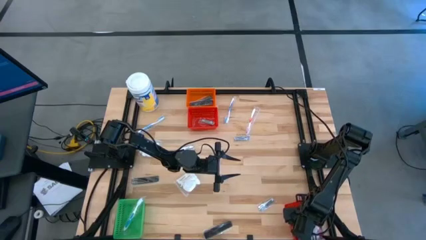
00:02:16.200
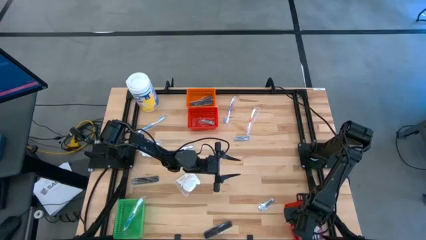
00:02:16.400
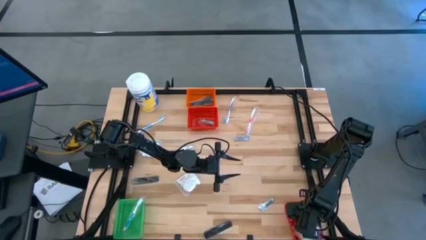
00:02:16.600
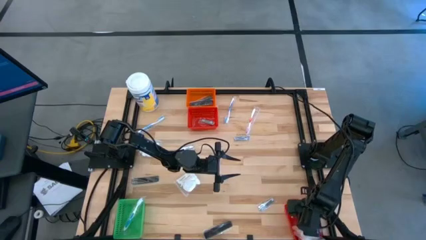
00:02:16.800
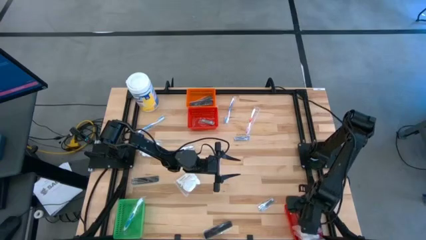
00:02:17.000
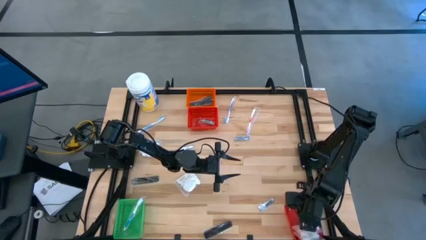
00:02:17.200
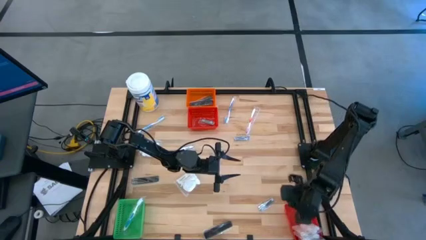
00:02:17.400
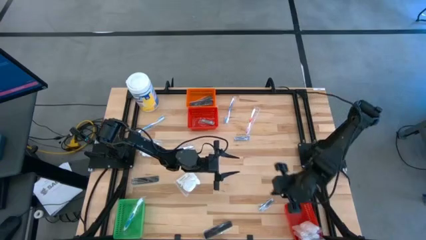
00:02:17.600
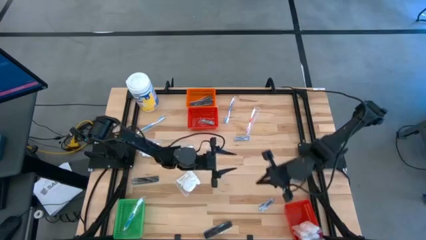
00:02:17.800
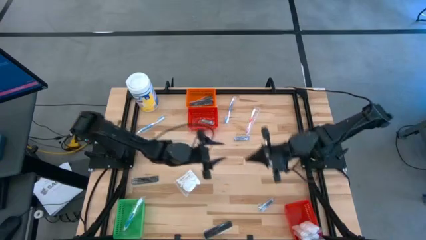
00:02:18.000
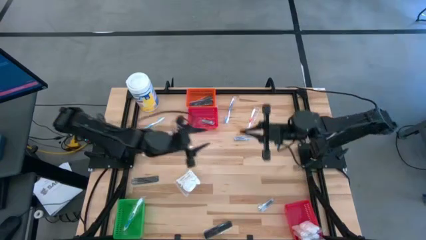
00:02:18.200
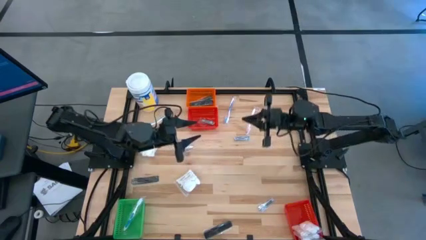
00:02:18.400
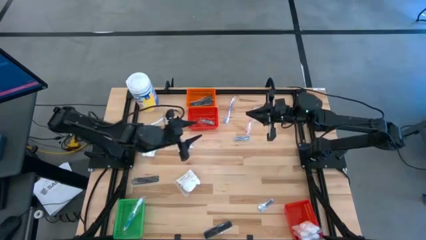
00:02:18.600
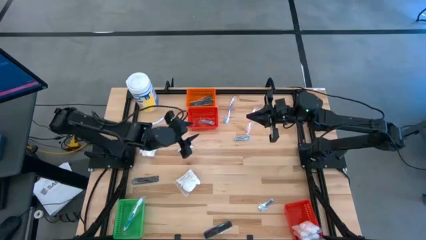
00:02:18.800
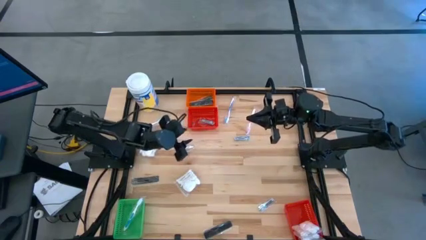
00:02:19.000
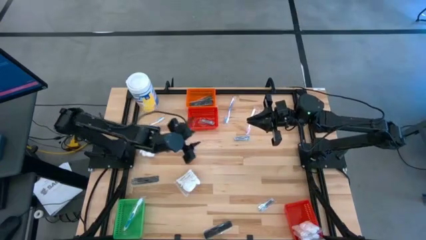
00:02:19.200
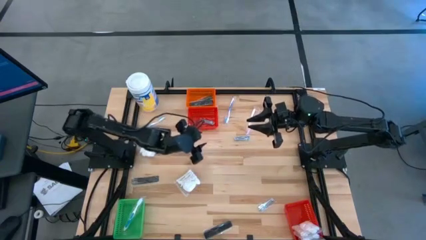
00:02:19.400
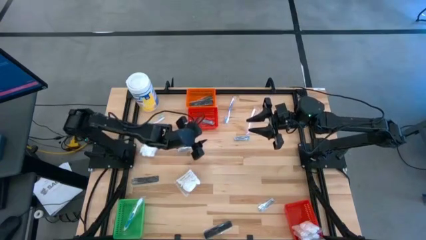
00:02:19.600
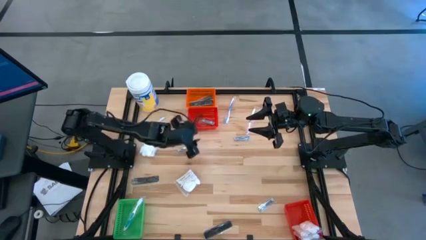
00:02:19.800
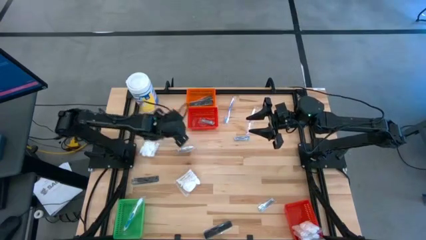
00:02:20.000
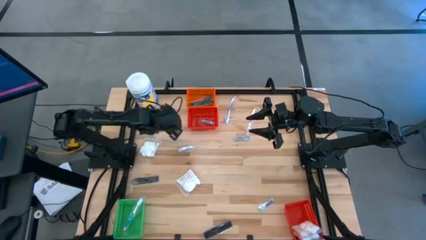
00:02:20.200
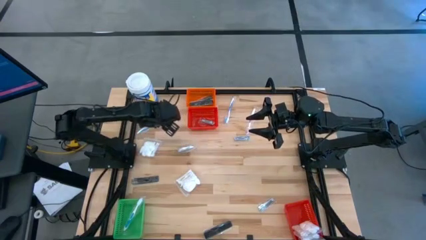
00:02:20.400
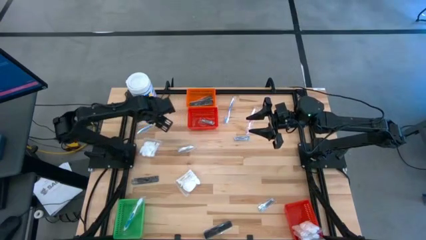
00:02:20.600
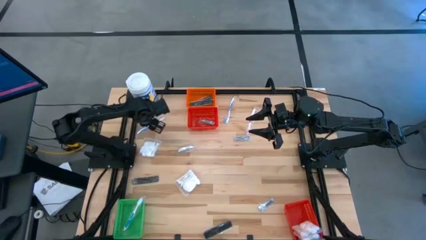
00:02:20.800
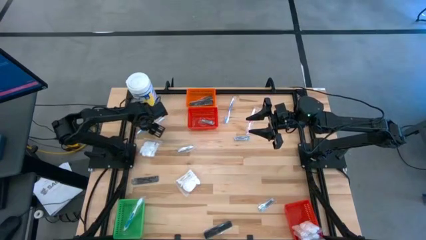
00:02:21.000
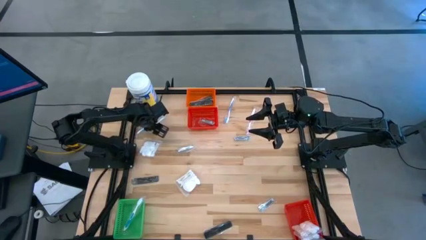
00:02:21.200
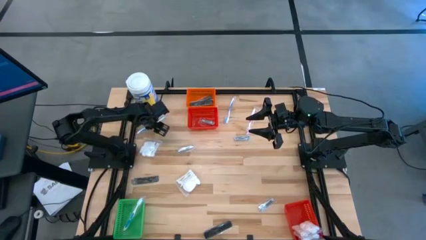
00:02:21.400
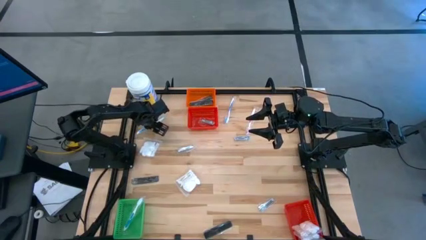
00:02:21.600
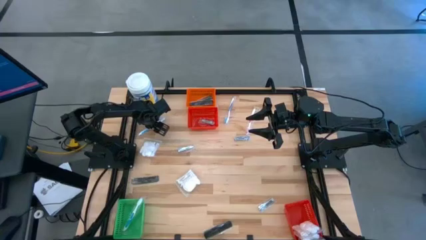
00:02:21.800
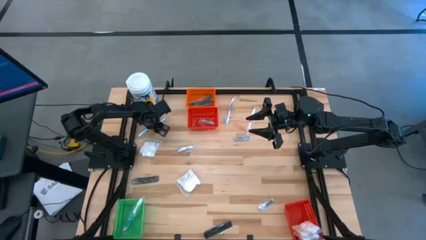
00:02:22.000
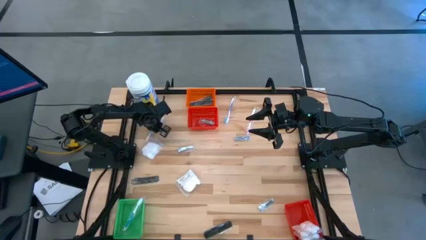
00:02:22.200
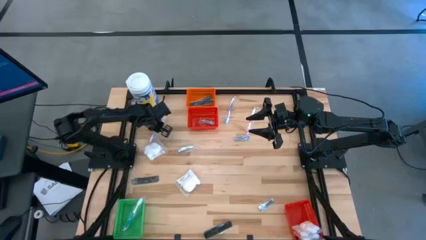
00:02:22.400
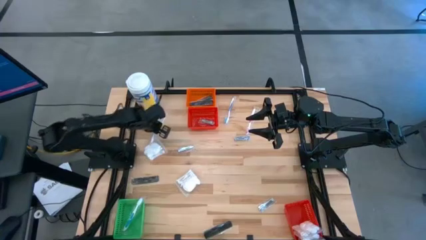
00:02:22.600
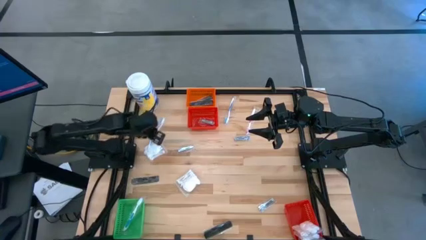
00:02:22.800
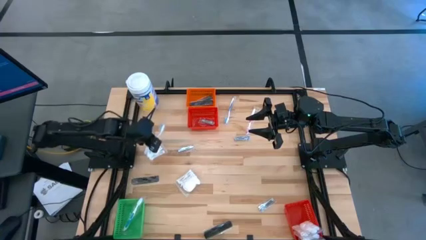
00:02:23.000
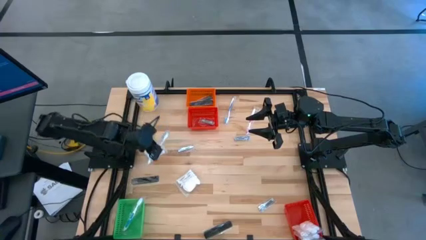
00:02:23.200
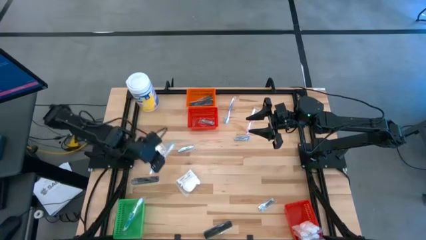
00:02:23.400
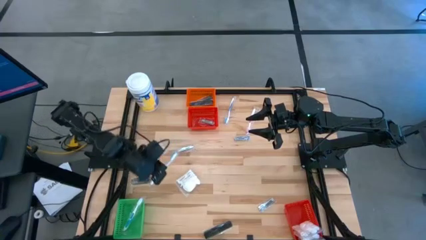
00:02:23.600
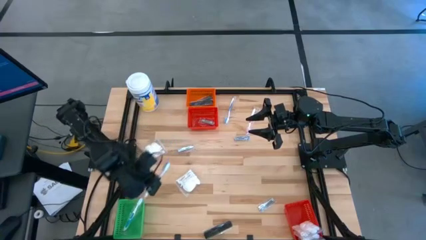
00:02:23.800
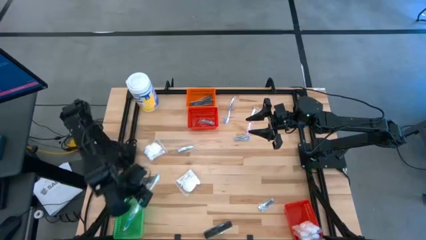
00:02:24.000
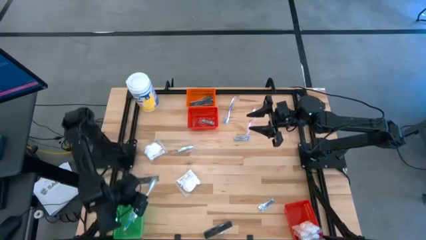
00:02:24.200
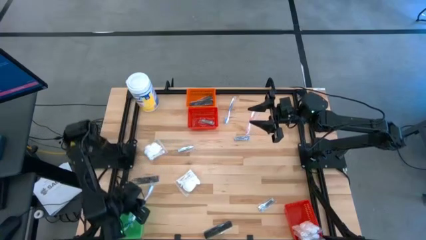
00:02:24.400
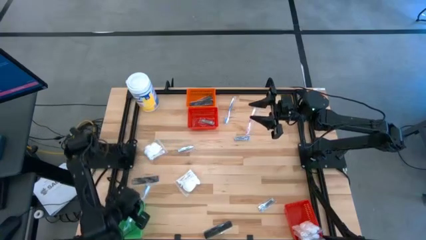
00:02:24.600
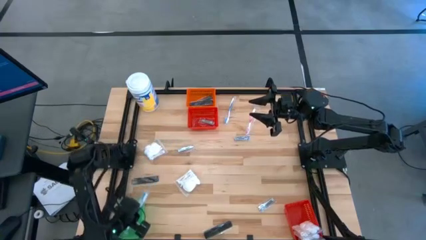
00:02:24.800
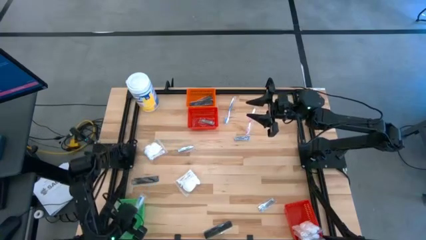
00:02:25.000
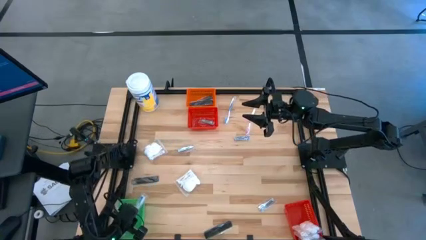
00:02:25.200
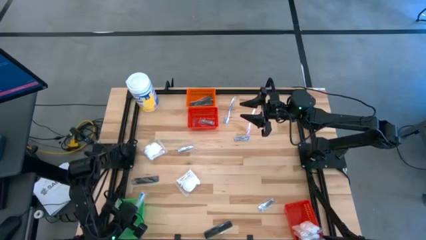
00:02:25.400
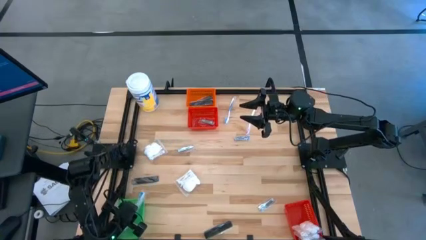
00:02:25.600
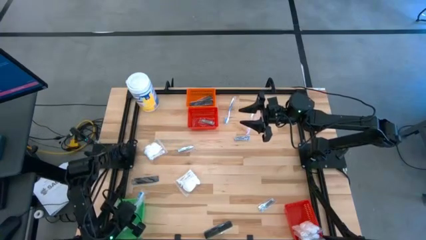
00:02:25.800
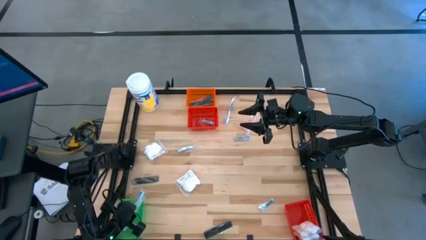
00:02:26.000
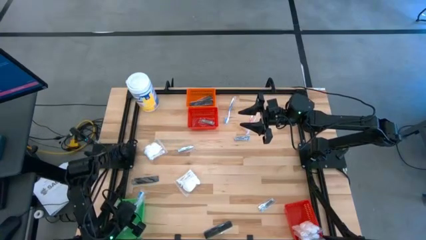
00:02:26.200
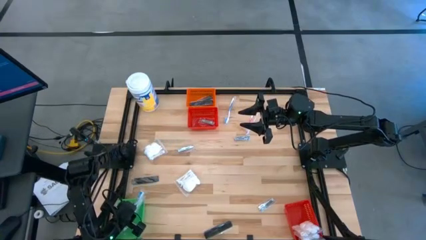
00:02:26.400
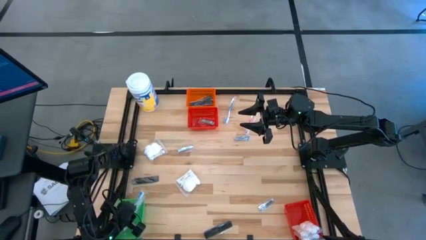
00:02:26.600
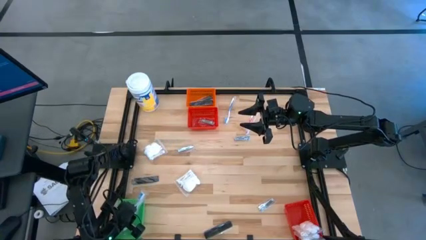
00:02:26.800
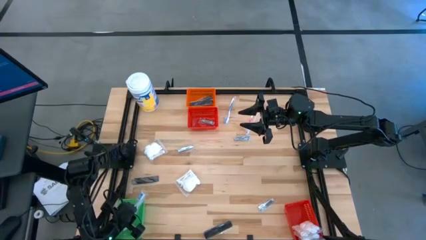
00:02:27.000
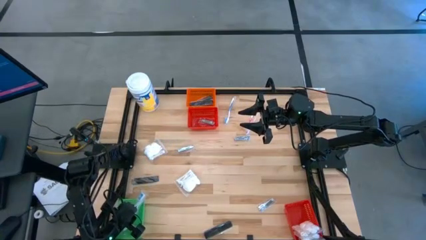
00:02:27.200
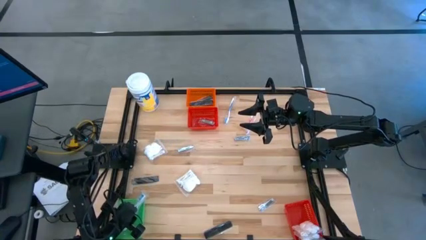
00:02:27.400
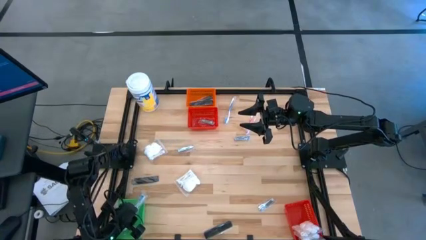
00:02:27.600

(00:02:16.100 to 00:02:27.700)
Task: Pick & Place Travel size toiletries
Put the blue toothbrush into the green basket

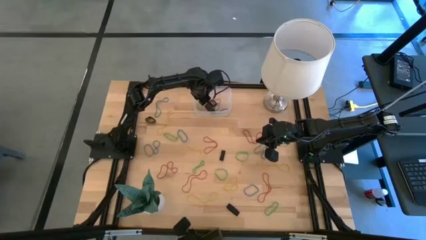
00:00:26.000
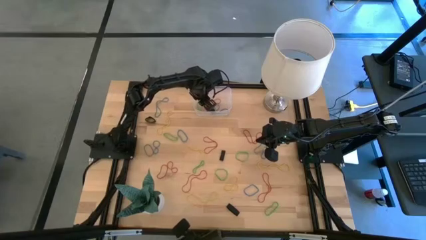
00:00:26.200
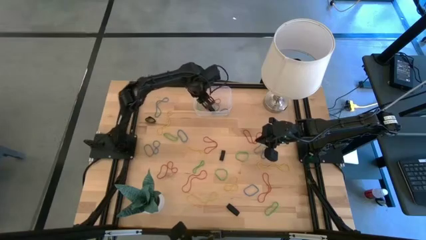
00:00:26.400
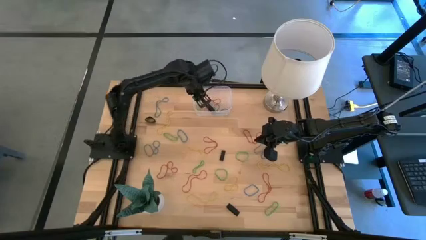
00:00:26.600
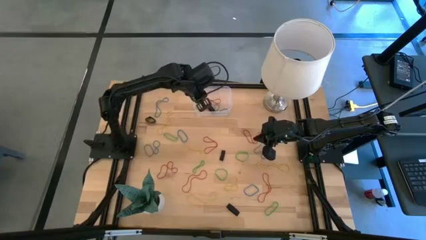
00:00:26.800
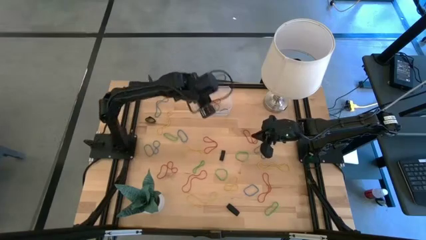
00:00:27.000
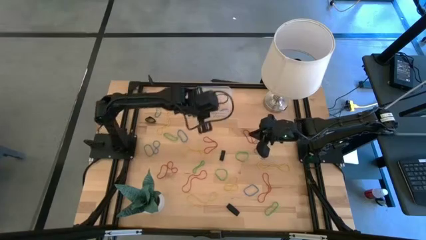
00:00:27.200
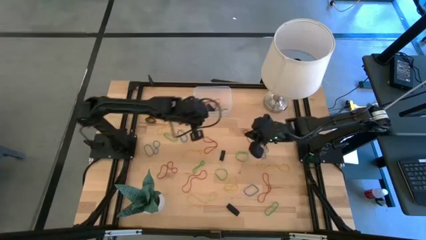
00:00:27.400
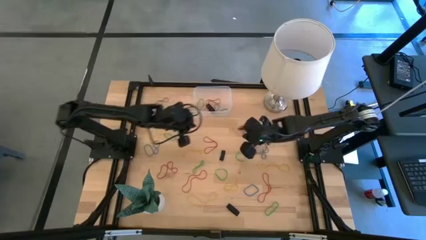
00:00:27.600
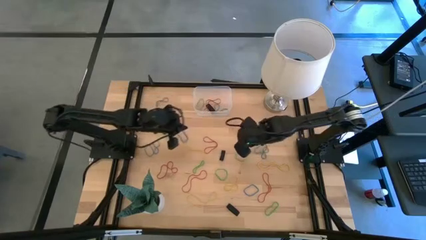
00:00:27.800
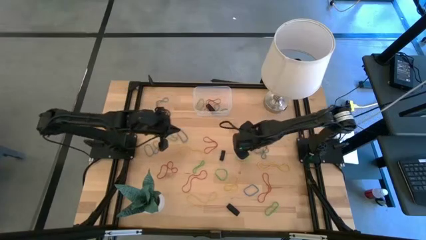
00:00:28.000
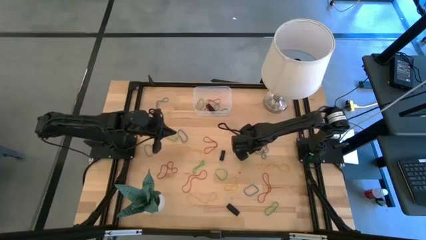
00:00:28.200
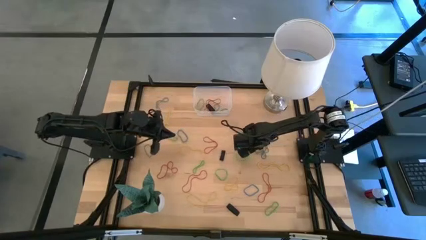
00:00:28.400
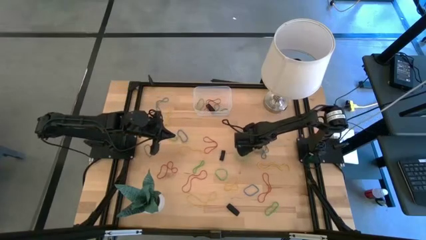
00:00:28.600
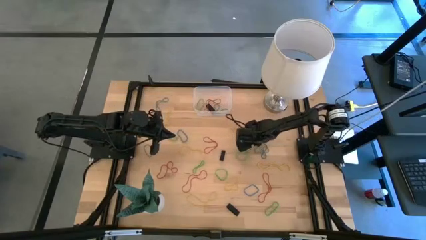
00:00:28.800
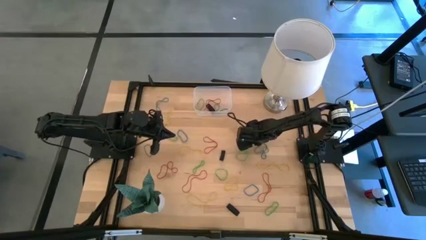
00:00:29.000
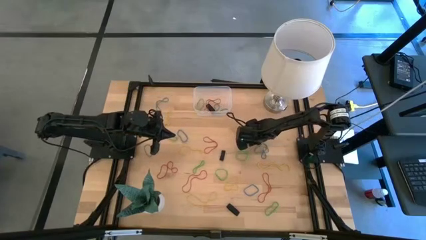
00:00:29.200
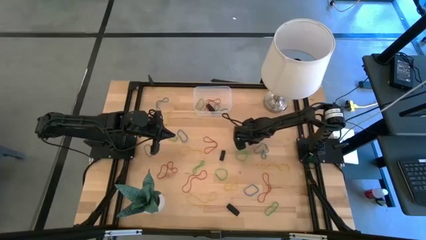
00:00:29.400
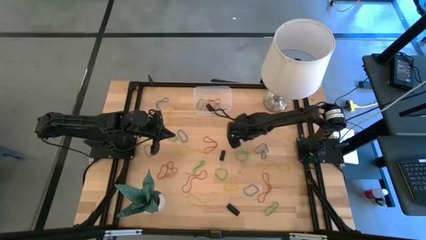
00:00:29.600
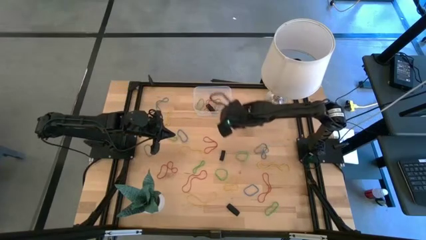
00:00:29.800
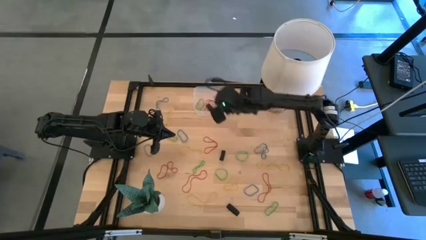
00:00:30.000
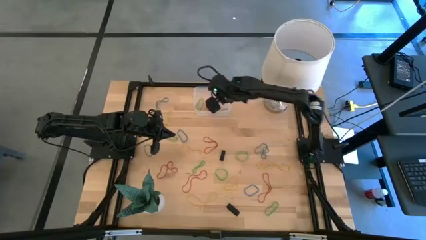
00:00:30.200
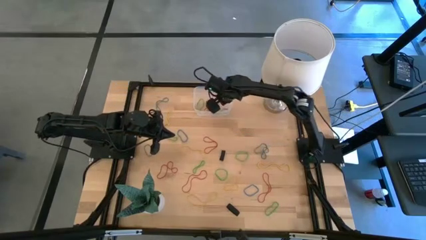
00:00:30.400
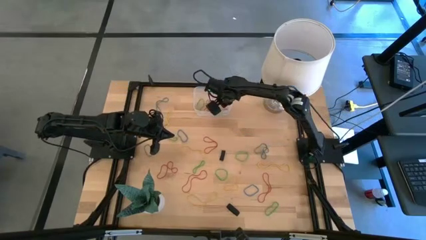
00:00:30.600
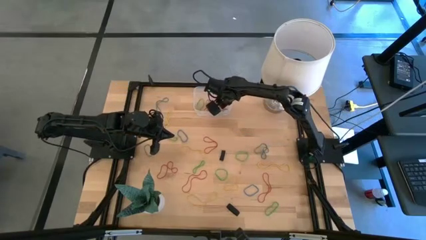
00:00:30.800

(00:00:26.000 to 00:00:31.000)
Task: Pick and place rubber bands into bin
Put the red rubber band into the transparent bin

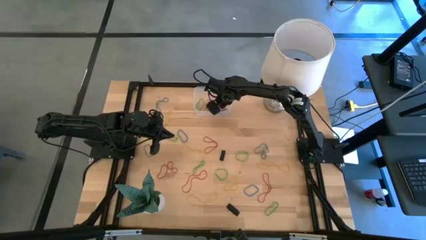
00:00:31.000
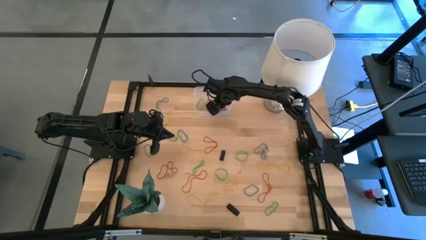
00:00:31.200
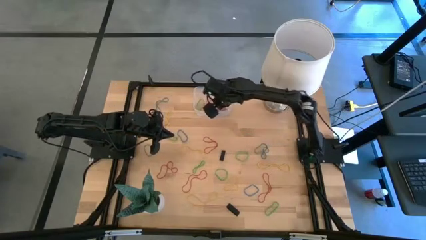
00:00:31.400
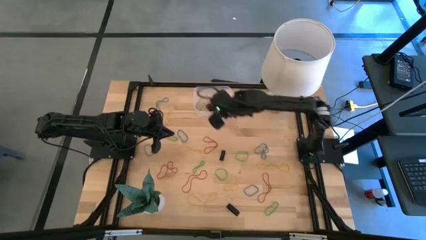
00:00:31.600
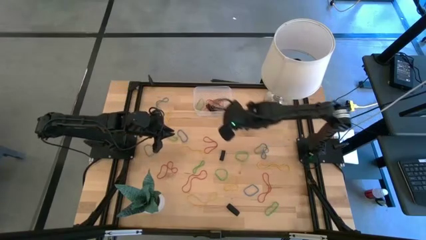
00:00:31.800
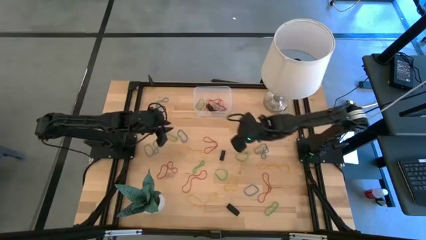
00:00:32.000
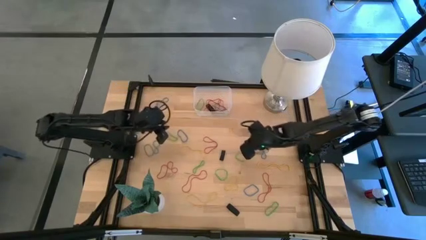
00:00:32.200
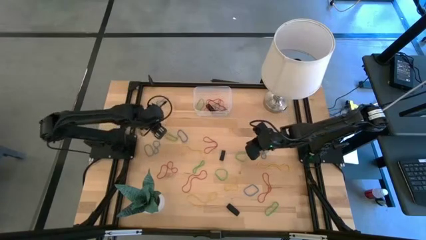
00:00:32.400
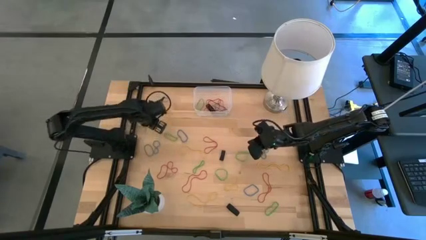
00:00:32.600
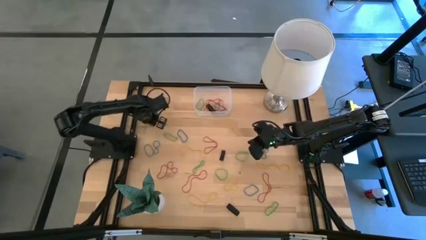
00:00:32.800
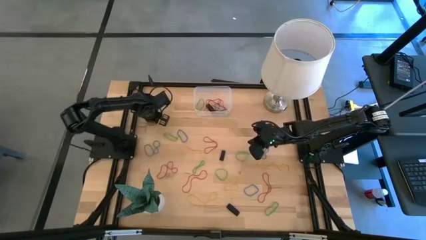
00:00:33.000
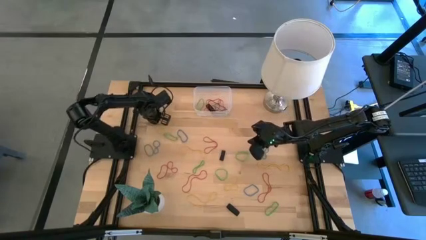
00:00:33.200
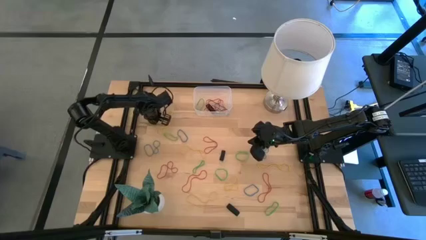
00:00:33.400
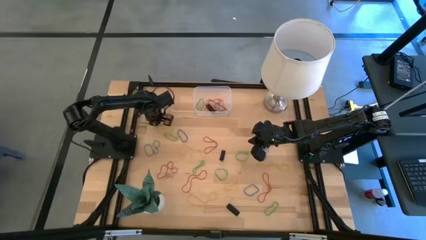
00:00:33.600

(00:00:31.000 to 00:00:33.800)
Put the black rubber band into the transparent bin
